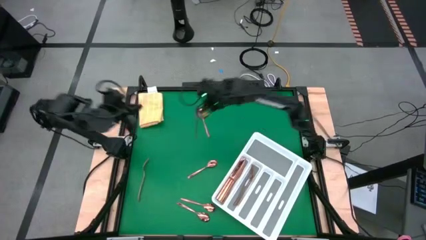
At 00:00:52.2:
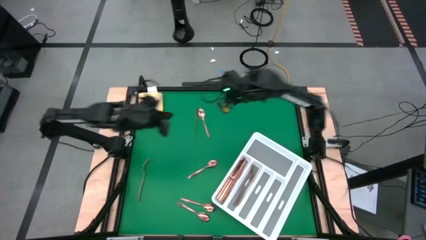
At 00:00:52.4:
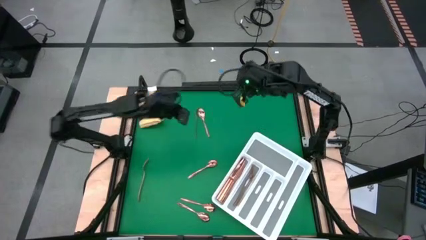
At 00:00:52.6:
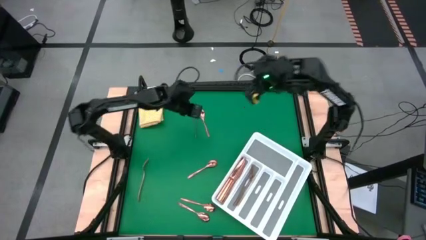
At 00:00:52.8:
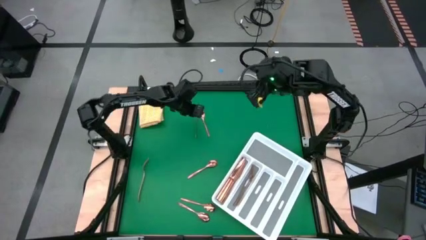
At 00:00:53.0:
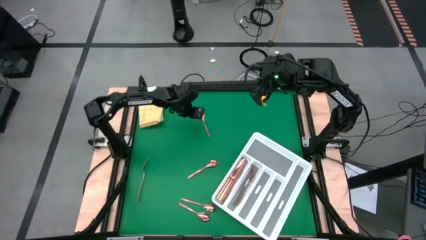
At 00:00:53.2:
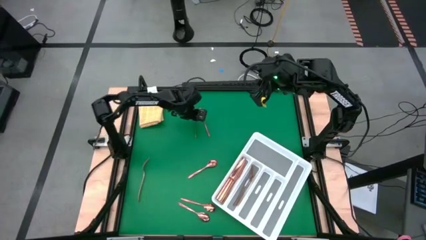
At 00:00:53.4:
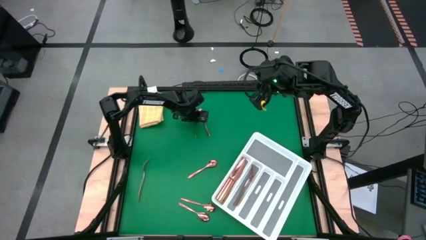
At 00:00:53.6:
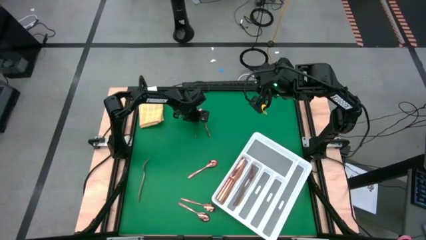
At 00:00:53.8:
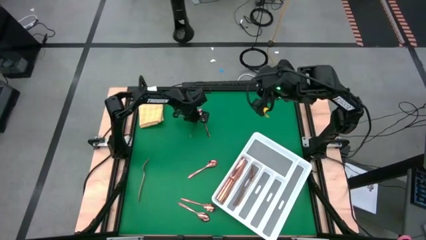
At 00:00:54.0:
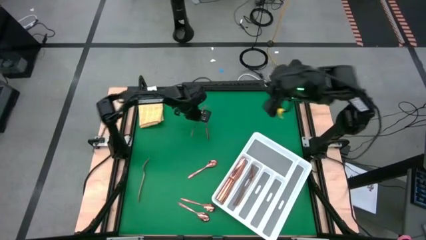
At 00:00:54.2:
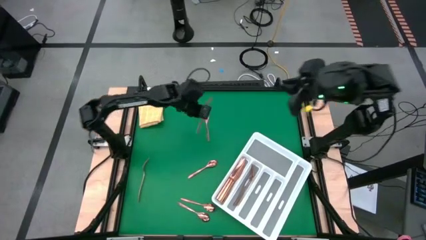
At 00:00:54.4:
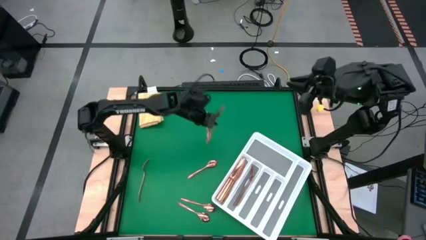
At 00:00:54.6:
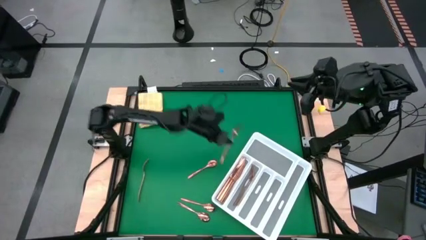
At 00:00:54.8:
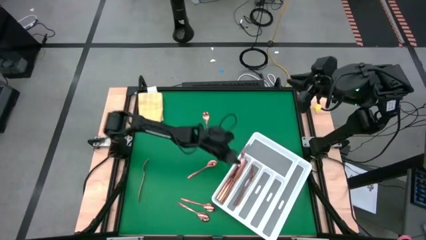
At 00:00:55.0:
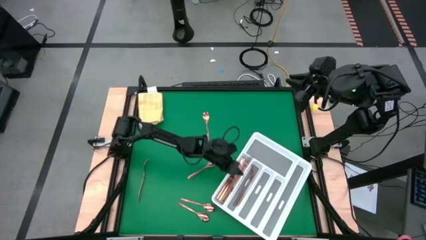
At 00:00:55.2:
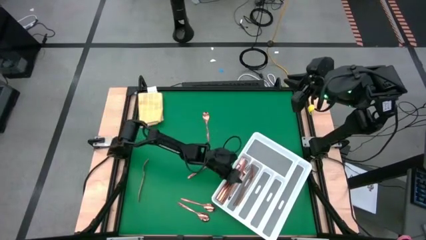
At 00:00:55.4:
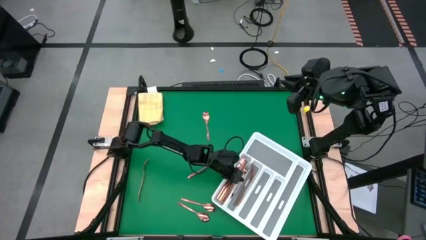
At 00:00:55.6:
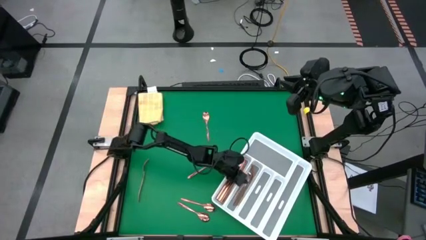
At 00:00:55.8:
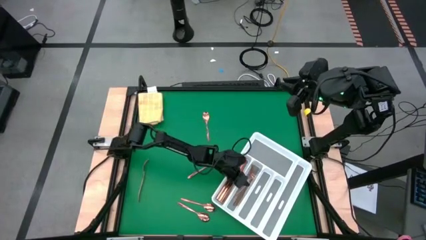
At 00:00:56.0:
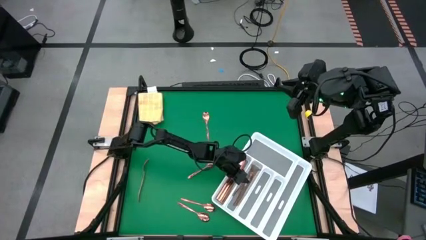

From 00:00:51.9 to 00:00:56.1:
Task: Sort silverware
Put the gold fork into the white cutlery tray

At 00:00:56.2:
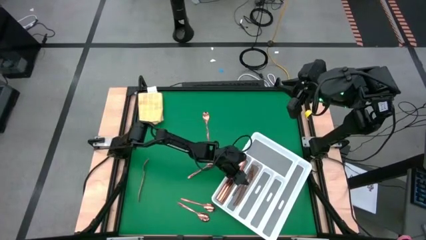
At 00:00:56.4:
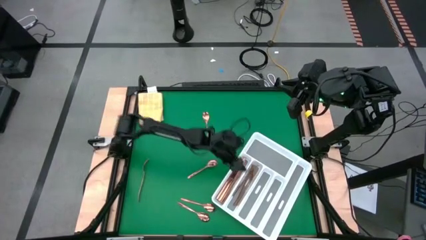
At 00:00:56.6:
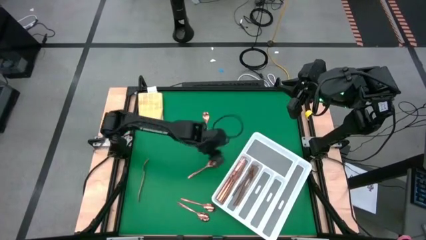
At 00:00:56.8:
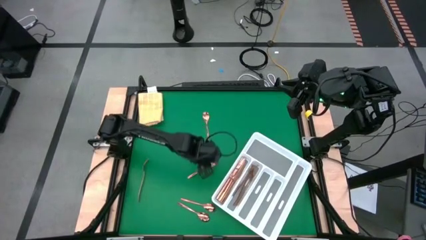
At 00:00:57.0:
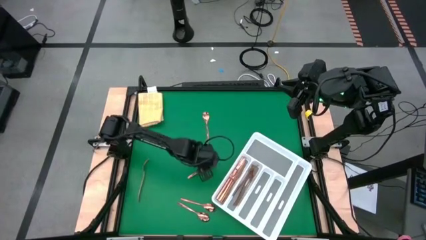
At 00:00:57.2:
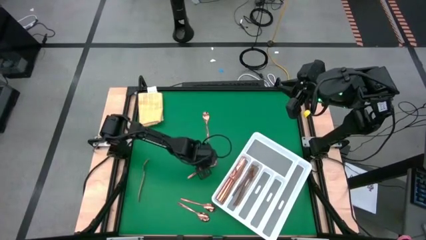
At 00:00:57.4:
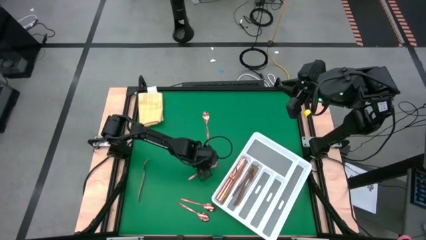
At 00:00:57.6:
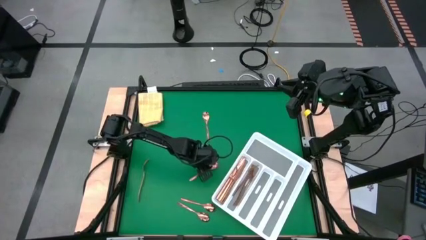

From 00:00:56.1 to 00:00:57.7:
Put the gold spoon into the white cutlery tray

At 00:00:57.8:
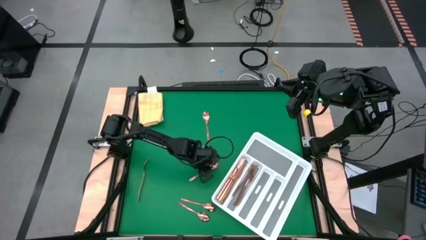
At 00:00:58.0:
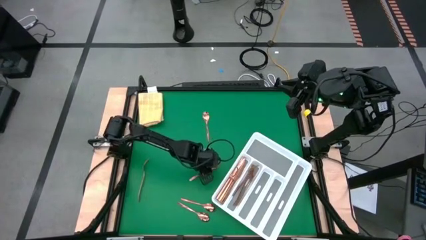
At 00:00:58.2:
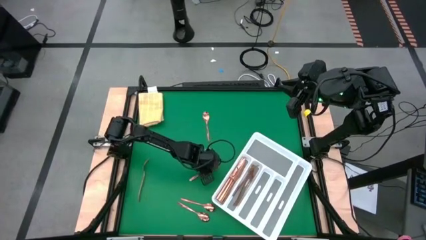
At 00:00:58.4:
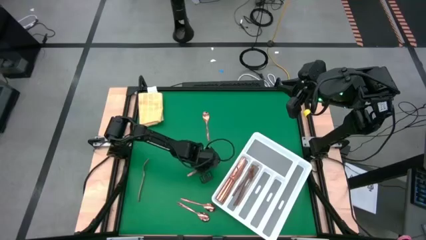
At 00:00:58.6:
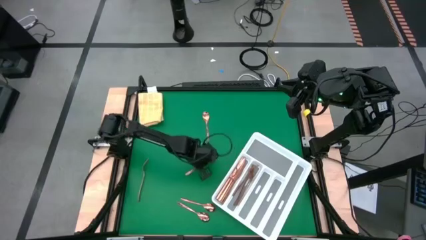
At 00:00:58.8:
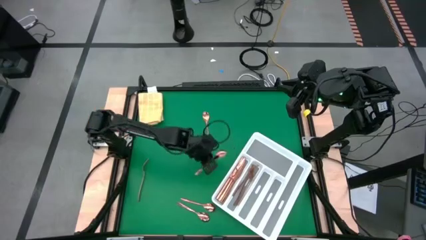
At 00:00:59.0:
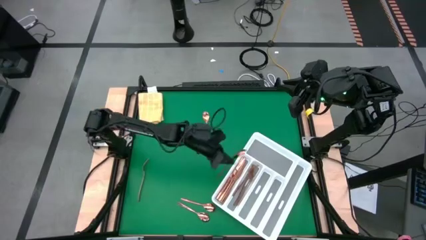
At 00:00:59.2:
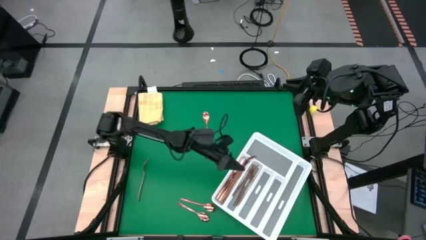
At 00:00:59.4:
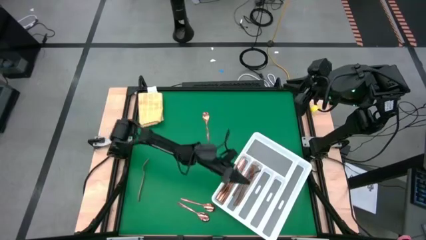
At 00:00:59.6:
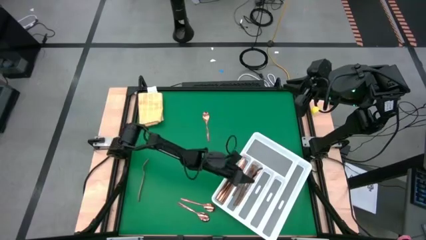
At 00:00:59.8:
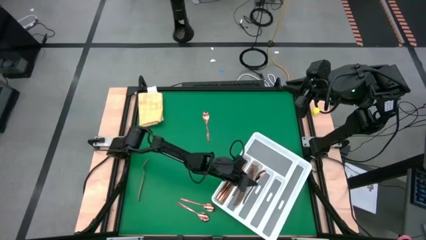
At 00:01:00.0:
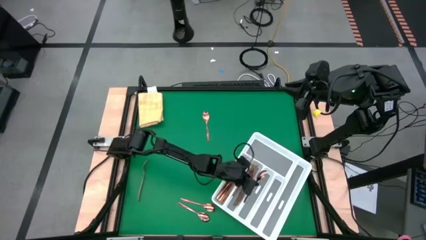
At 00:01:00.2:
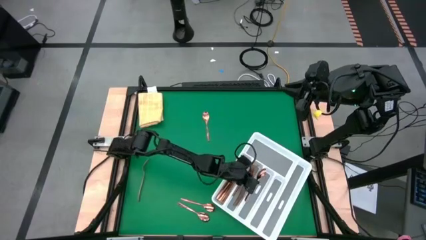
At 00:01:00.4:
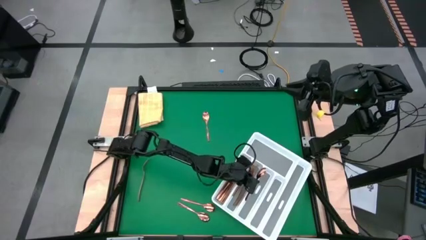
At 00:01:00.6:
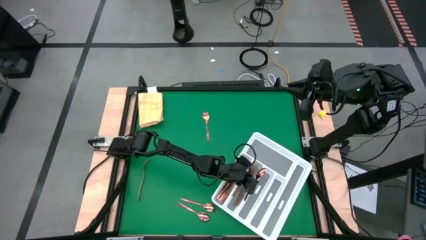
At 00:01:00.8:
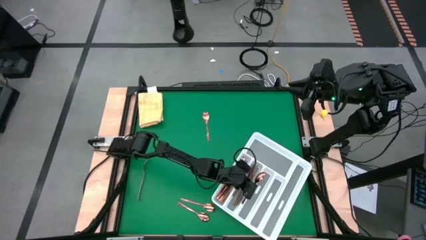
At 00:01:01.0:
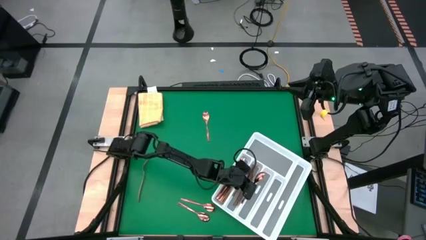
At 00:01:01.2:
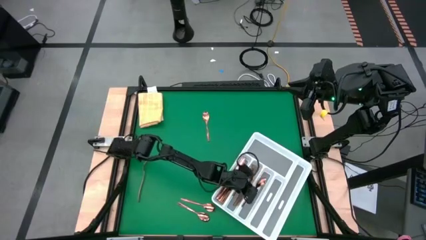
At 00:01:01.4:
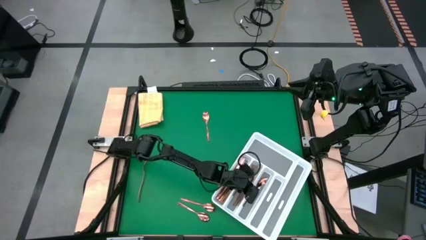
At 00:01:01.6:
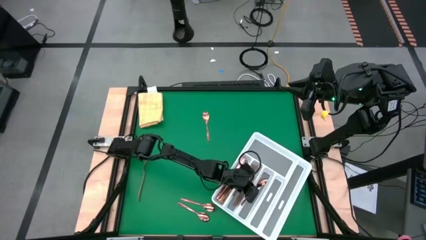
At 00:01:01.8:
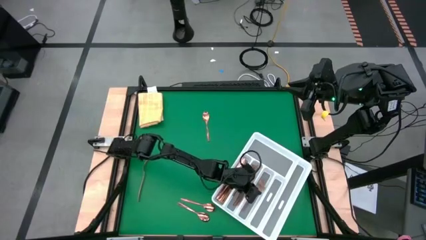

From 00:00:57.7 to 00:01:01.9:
Put the gold spoon into the white cutlery tray

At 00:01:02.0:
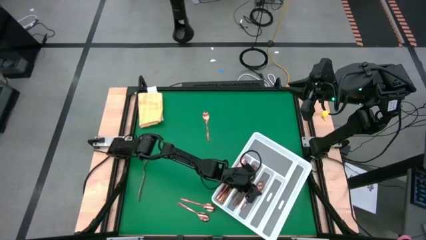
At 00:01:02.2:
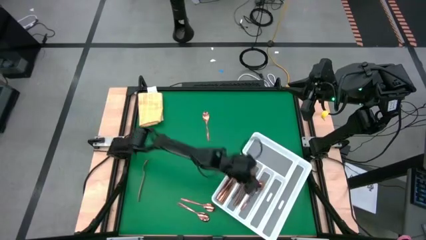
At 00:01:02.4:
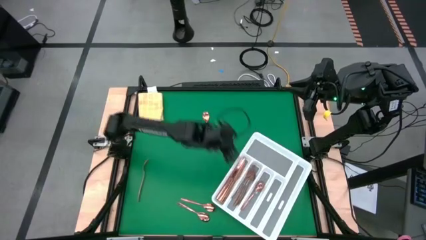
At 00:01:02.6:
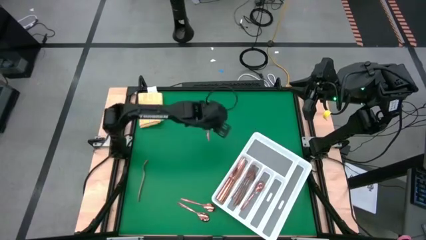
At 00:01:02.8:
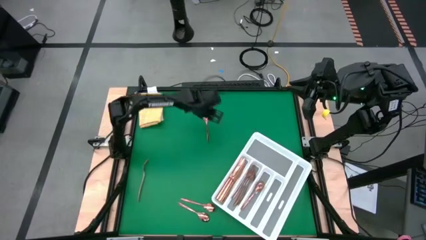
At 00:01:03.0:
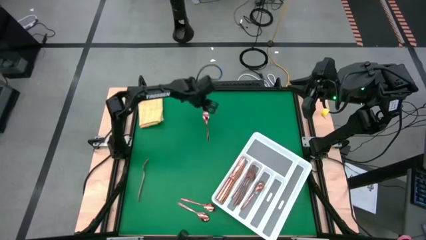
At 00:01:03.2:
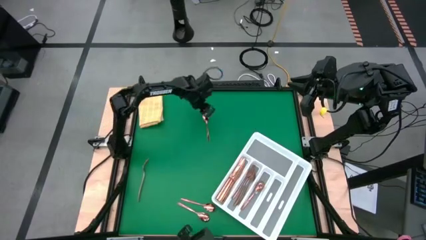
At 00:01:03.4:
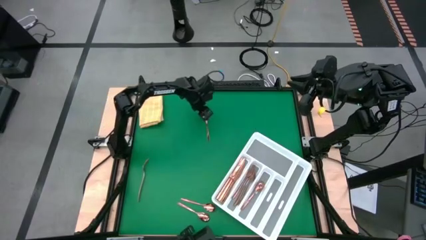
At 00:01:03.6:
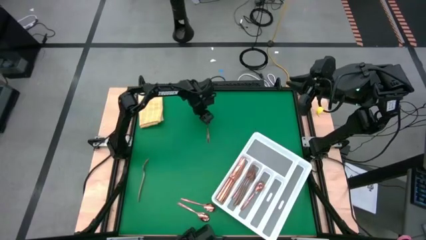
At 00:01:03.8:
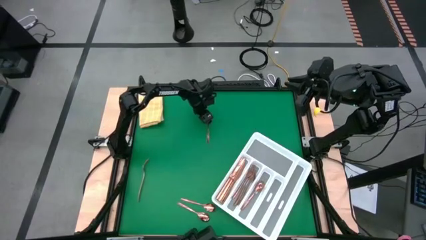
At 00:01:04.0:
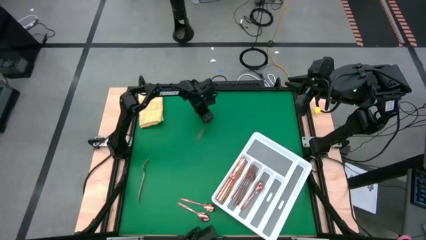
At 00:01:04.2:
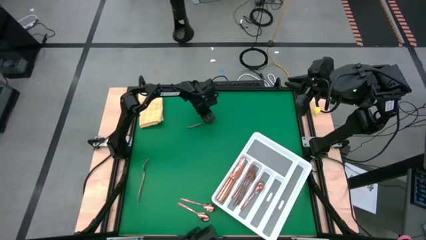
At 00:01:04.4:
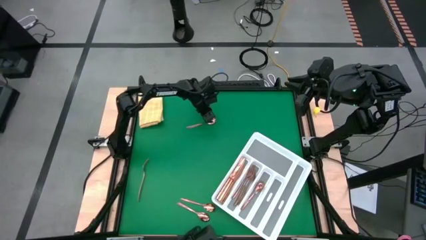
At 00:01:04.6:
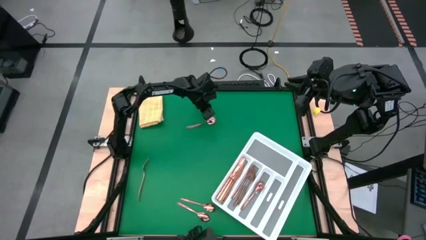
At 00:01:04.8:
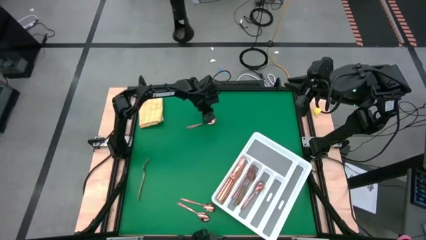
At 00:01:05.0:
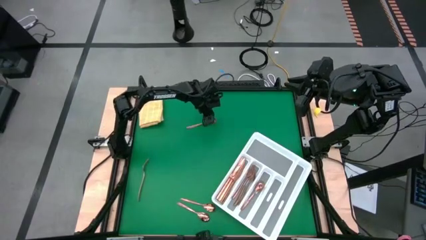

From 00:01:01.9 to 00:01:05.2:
Put the gold spoon into the white cutlery tray

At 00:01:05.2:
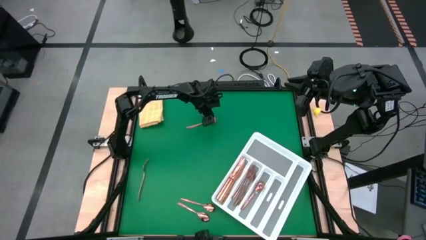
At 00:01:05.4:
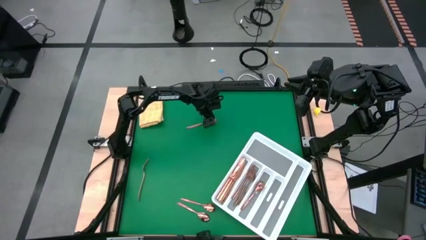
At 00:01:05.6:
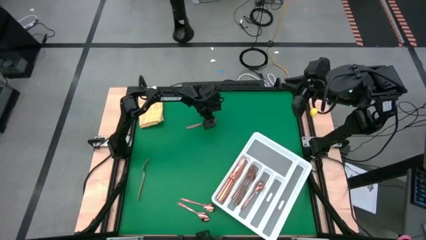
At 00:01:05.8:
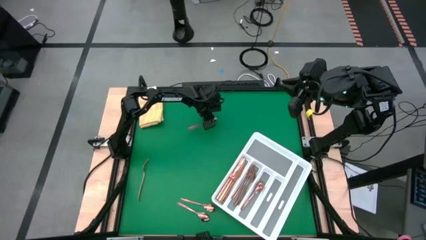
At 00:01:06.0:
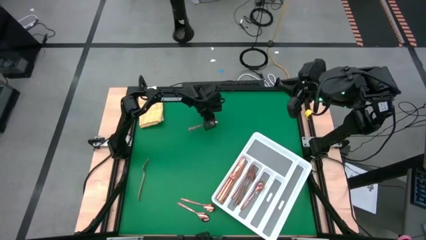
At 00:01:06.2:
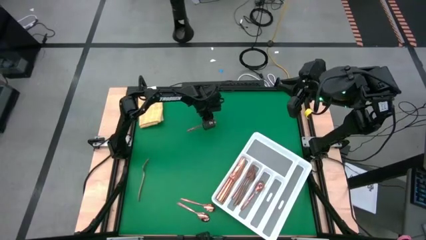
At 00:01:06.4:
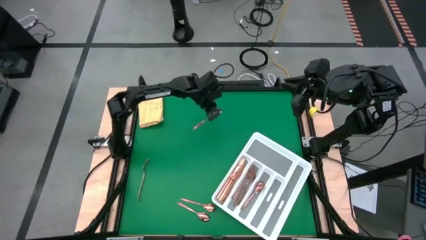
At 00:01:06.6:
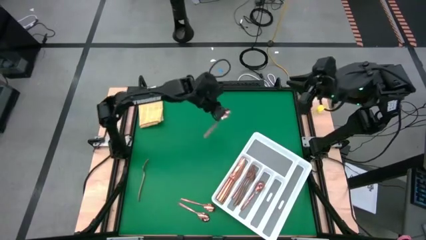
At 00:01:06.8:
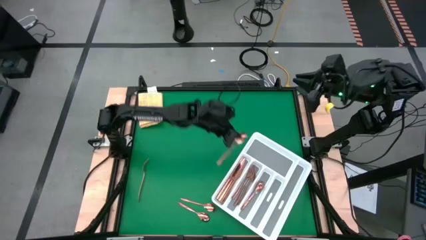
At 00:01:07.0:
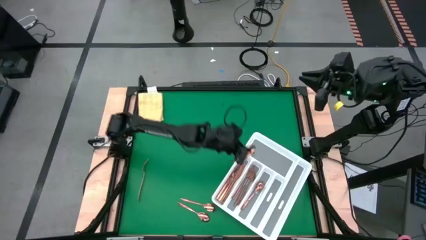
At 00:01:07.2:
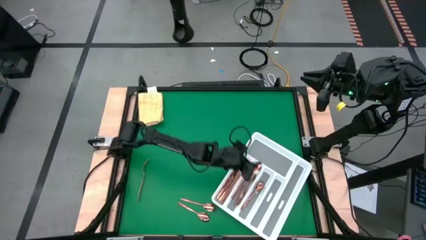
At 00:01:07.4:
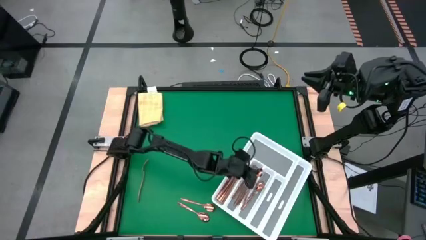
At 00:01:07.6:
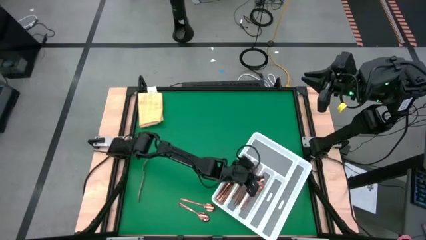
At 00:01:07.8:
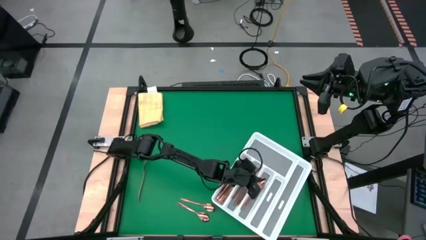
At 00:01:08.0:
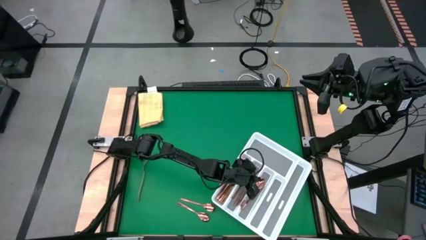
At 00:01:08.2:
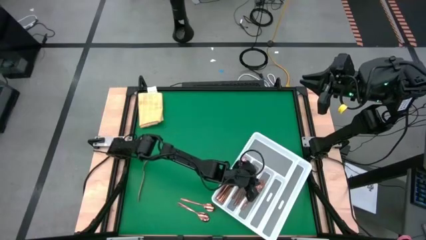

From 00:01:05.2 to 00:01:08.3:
Put the gold spoon into the white cutlery tray
